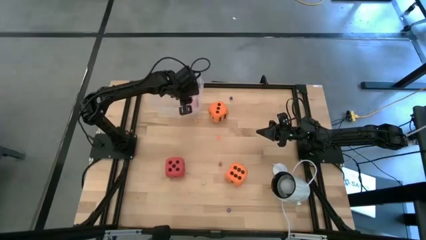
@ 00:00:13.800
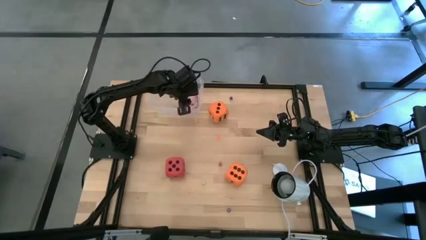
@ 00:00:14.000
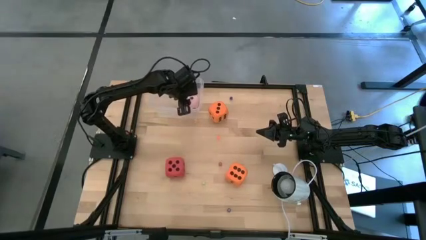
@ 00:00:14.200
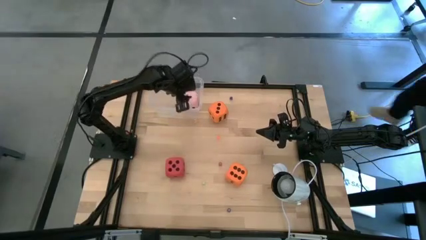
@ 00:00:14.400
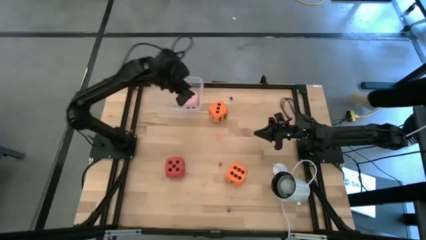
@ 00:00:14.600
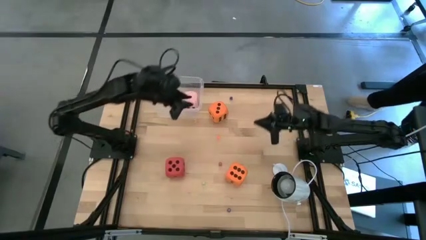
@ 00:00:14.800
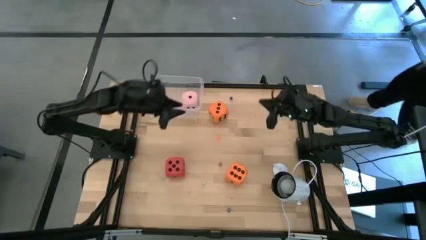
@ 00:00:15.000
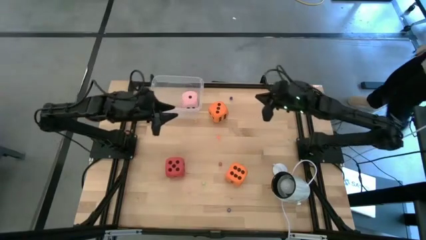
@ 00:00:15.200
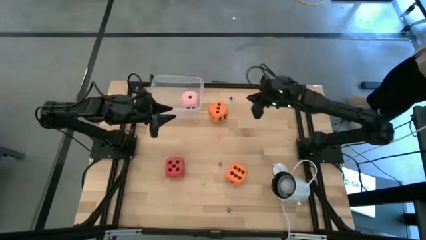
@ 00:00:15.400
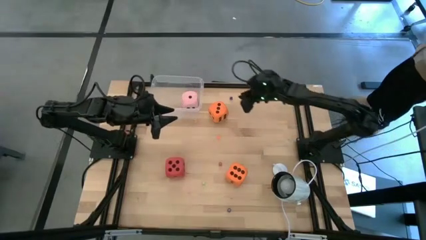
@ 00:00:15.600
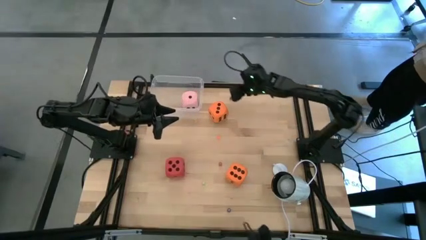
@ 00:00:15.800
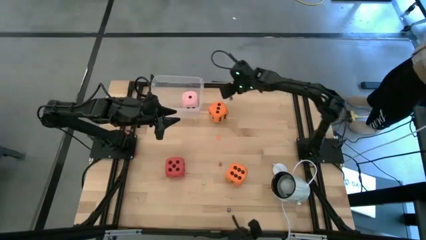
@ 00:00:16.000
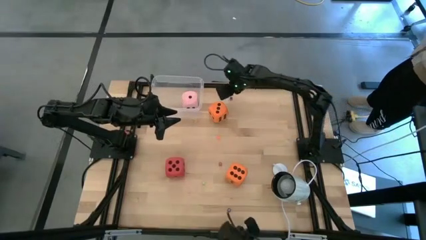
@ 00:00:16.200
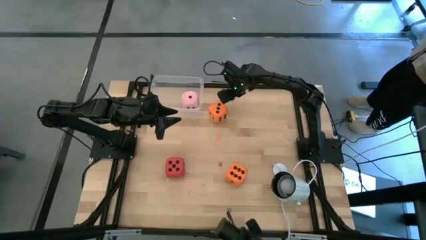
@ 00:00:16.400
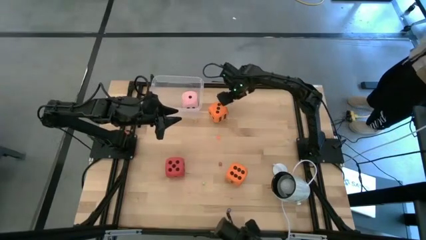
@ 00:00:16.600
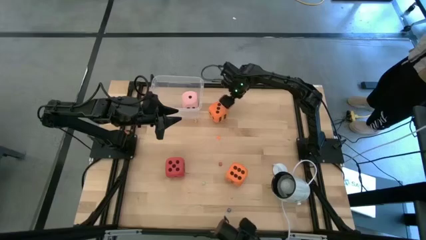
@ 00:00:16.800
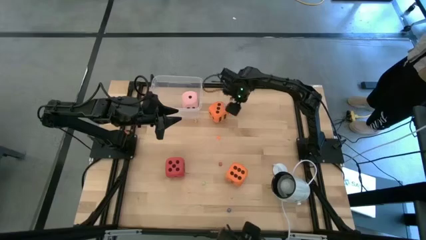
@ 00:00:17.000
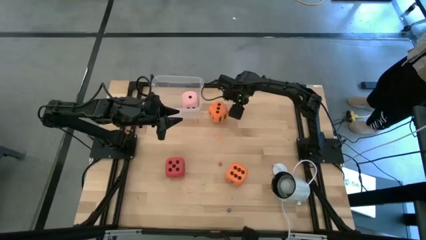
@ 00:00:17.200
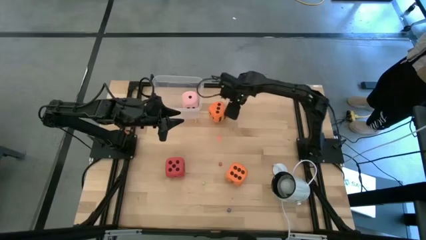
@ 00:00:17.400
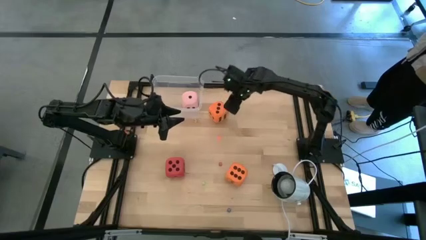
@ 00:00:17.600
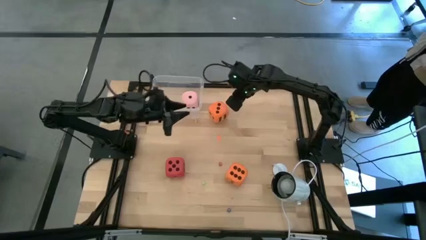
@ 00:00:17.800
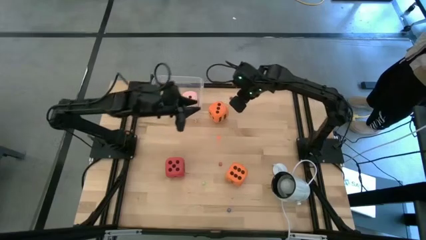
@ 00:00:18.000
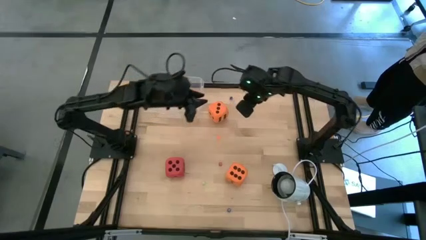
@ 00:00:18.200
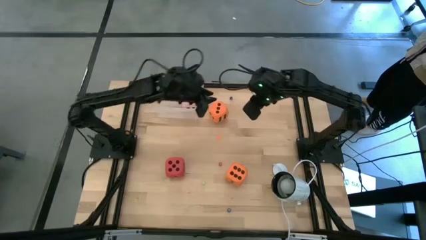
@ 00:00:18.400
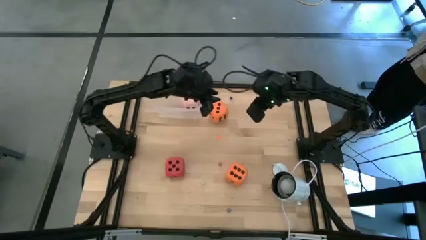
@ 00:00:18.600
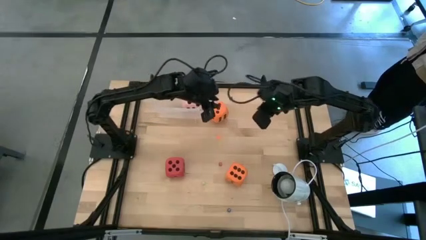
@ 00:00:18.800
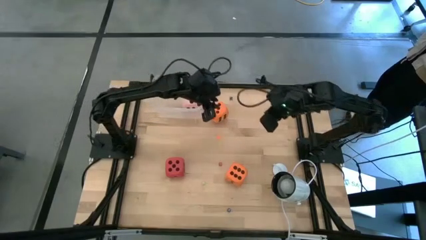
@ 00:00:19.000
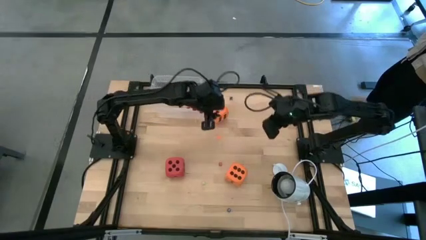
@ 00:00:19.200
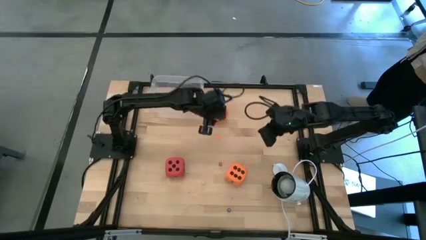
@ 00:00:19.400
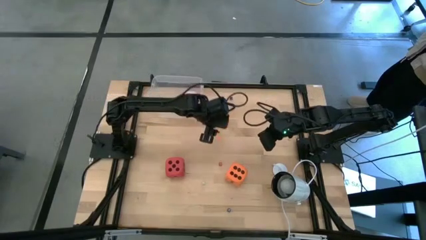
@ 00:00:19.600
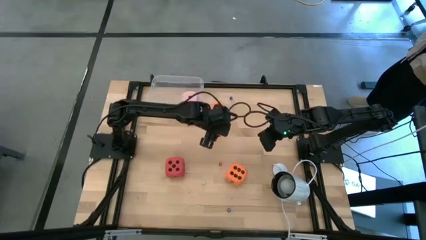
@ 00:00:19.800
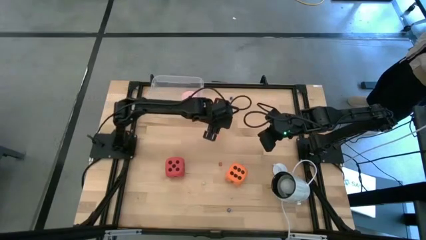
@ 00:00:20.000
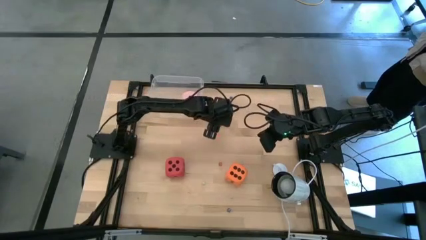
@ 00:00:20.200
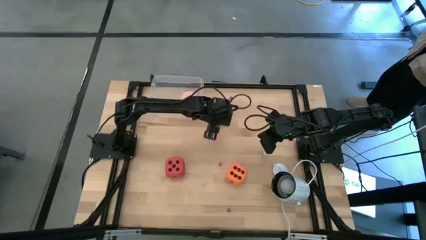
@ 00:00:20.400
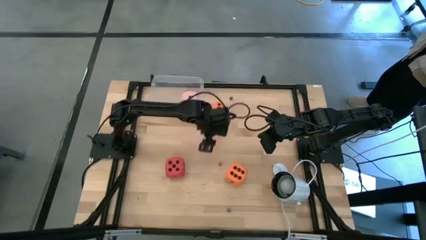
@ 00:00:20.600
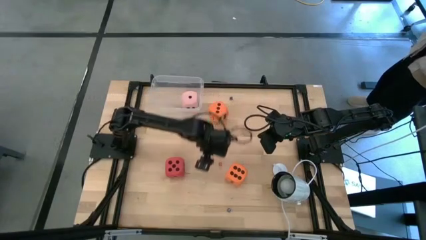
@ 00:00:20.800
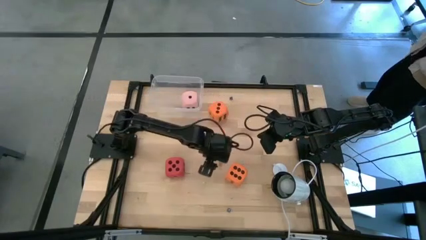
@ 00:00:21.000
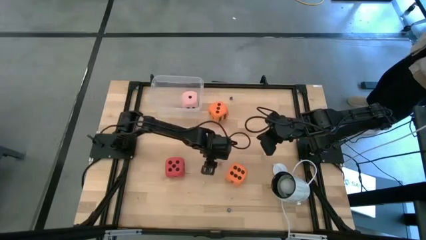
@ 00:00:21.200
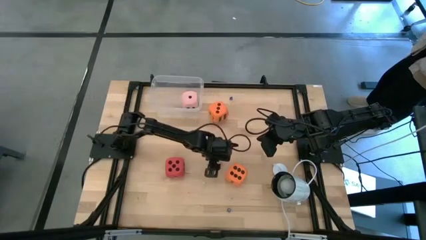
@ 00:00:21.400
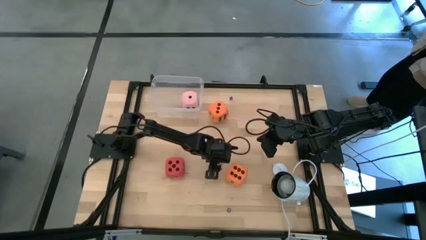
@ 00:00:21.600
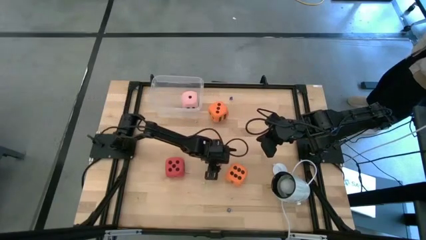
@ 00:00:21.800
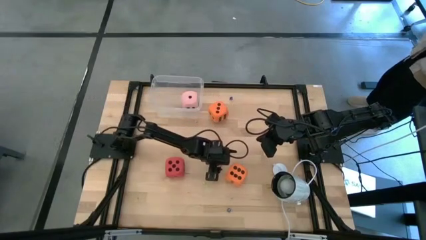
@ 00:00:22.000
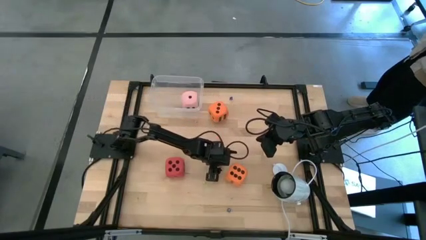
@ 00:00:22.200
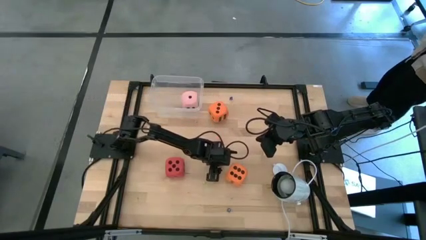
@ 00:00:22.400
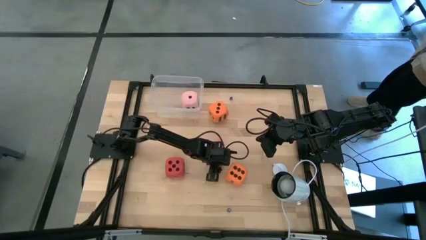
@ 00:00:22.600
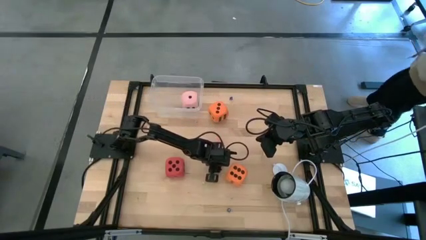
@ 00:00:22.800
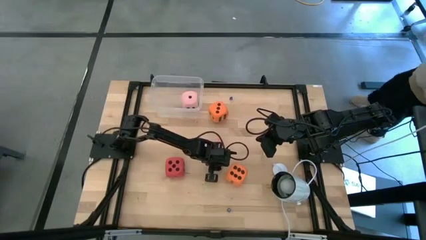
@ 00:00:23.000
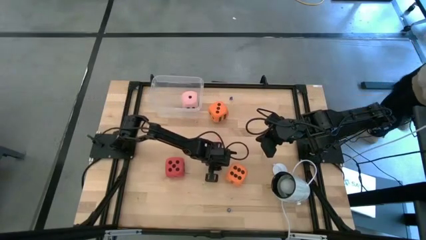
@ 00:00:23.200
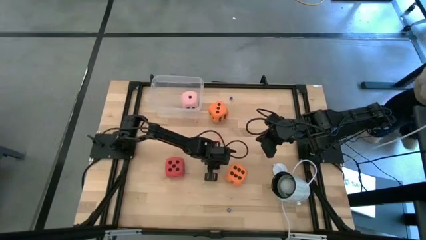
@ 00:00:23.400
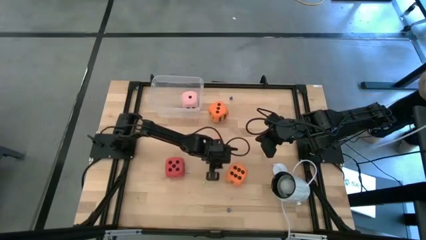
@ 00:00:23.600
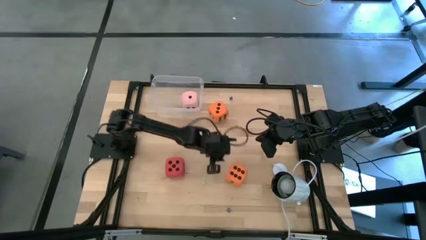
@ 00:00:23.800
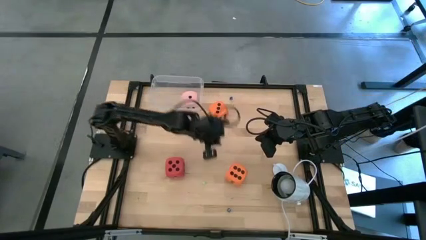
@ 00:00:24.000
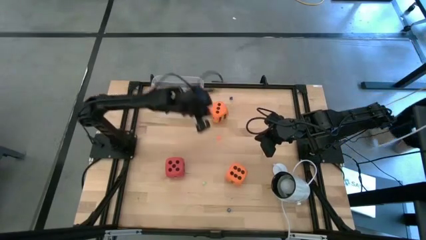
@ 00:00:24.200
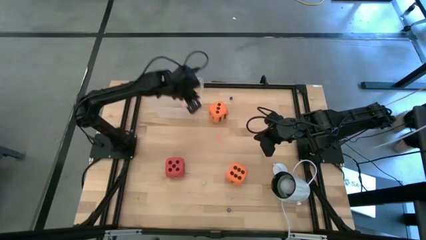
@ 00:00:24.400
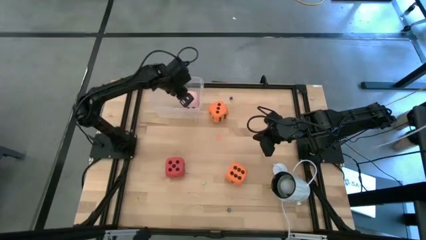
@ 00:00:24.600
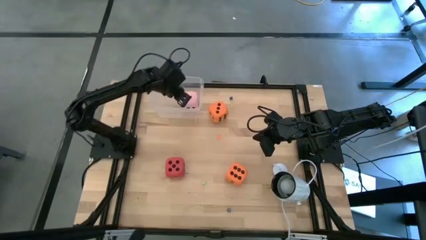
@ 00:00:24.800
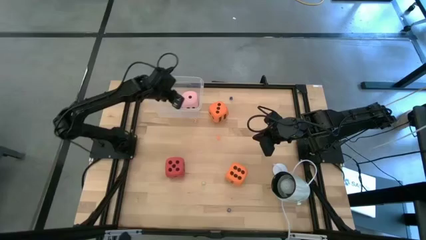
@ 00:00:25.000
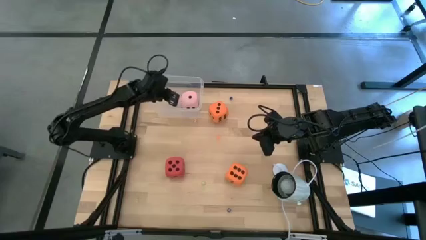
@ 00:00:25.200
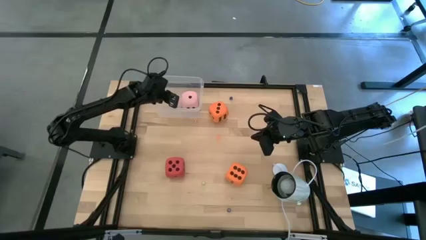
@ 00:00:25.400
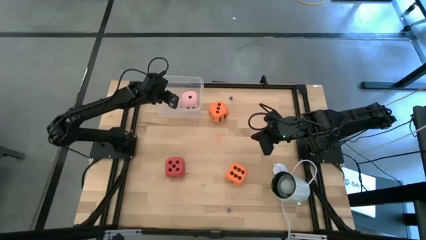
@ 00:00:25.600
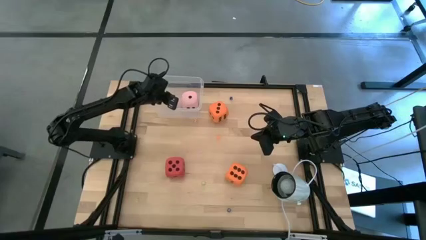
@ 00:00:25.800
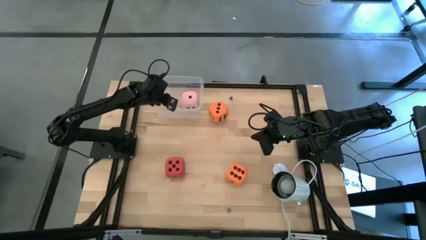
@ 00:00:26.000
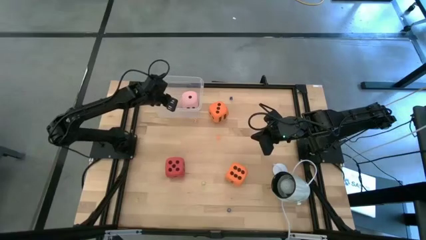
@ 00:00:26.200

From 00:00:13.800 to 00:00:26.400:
Task: Pick & Place Dice
Put the small red die into the transparent bin
